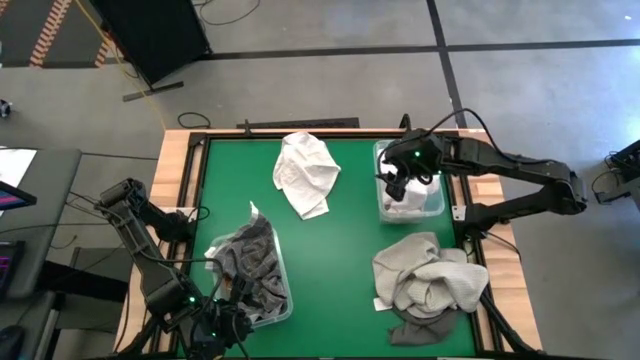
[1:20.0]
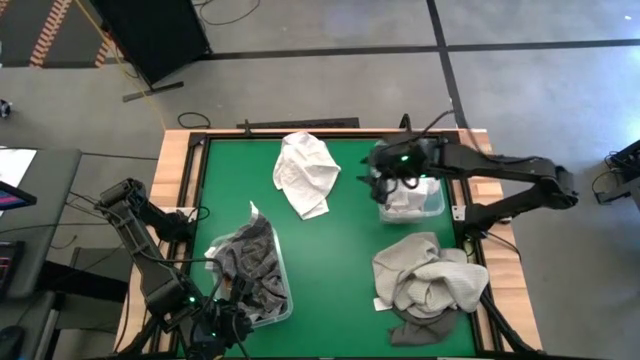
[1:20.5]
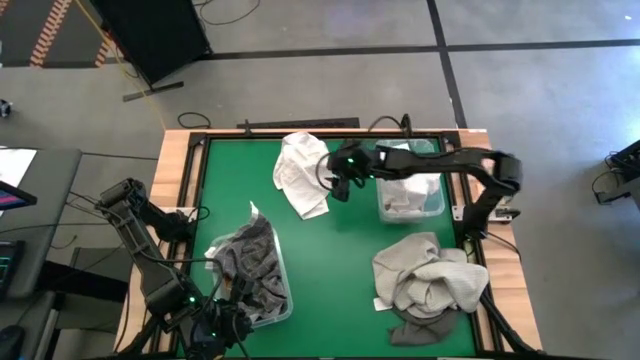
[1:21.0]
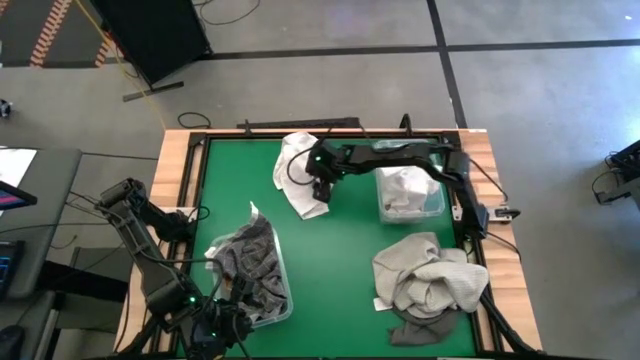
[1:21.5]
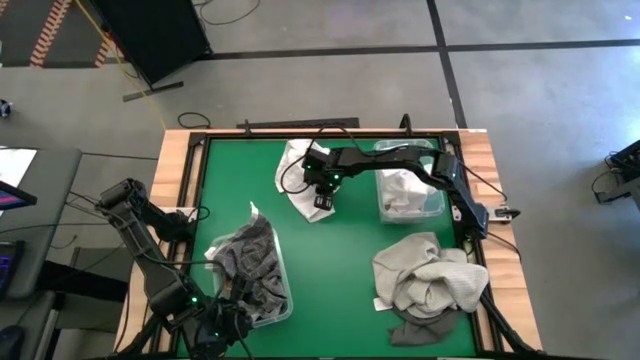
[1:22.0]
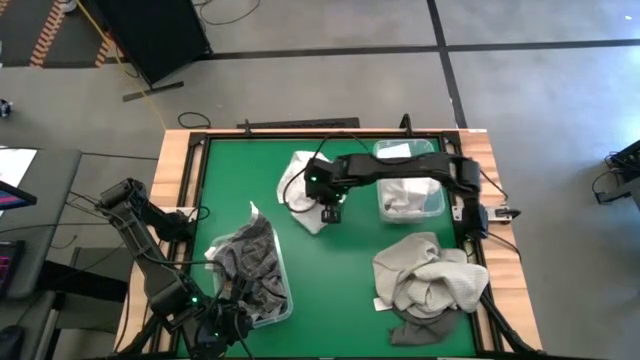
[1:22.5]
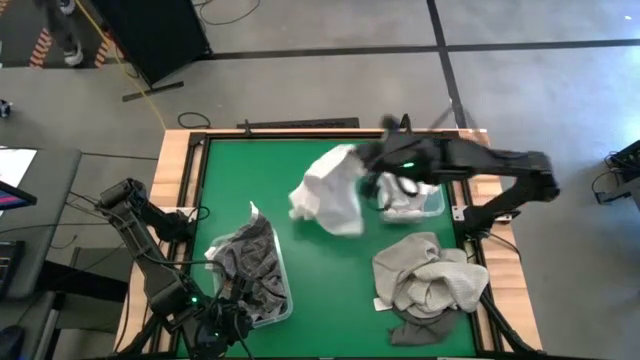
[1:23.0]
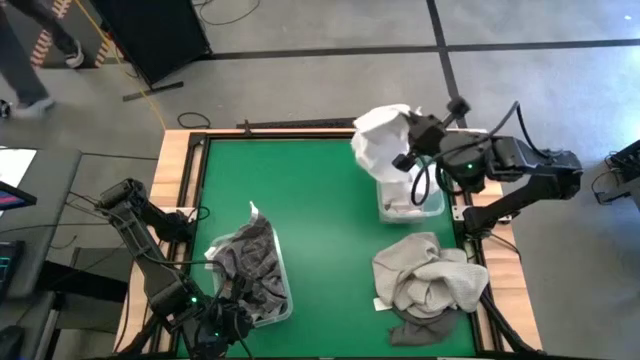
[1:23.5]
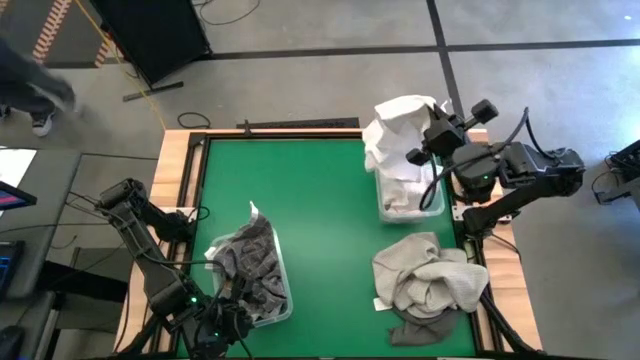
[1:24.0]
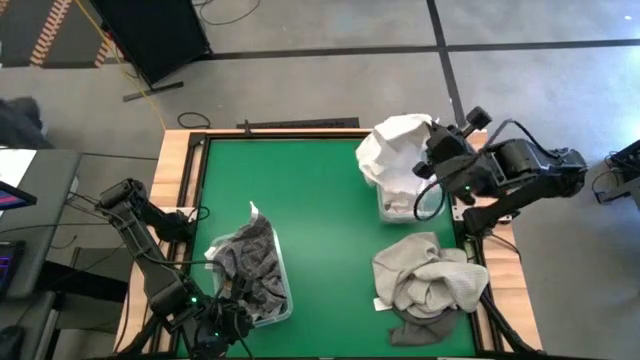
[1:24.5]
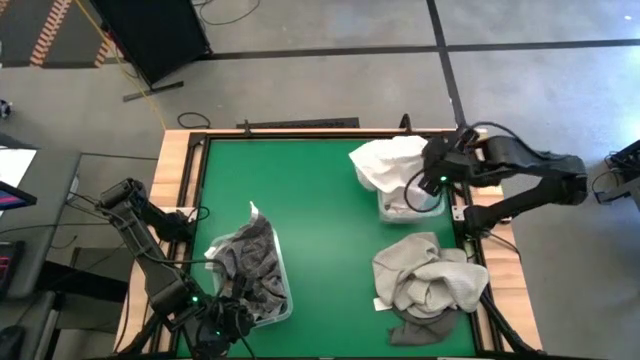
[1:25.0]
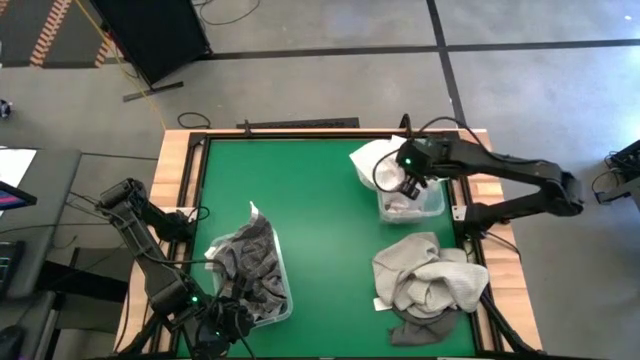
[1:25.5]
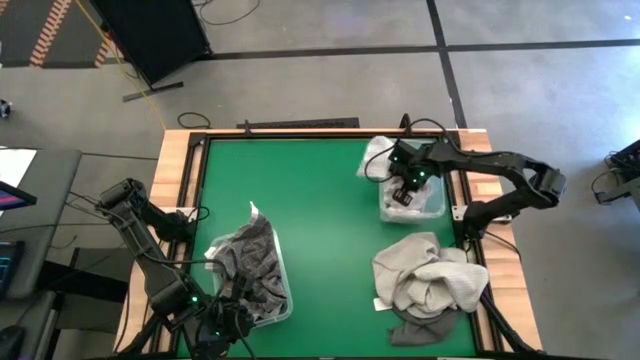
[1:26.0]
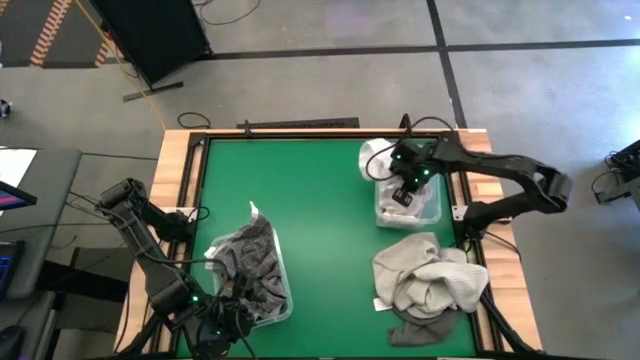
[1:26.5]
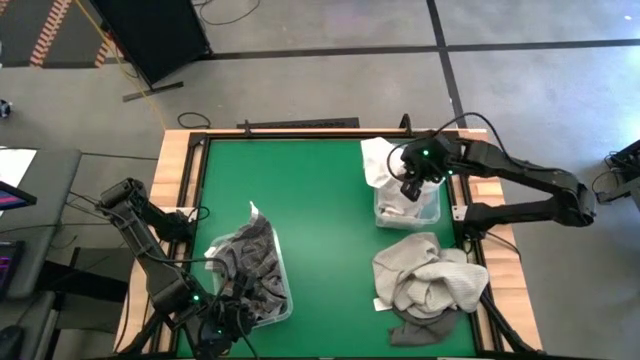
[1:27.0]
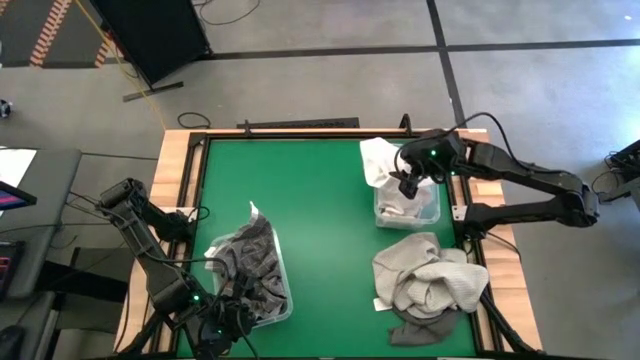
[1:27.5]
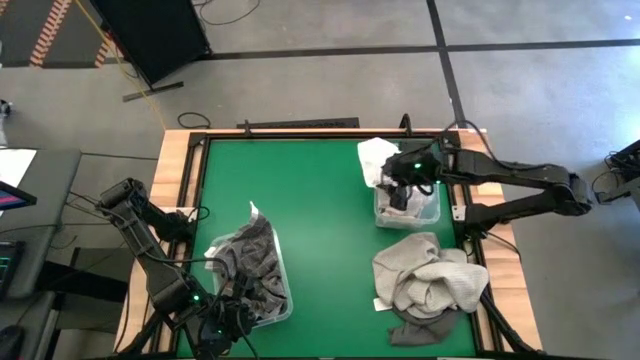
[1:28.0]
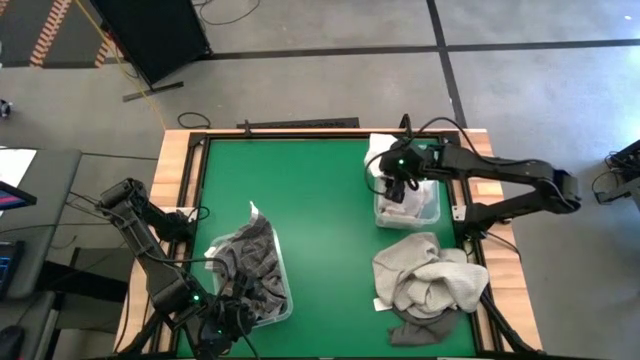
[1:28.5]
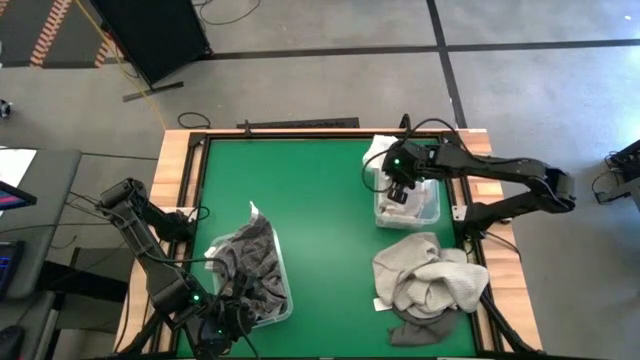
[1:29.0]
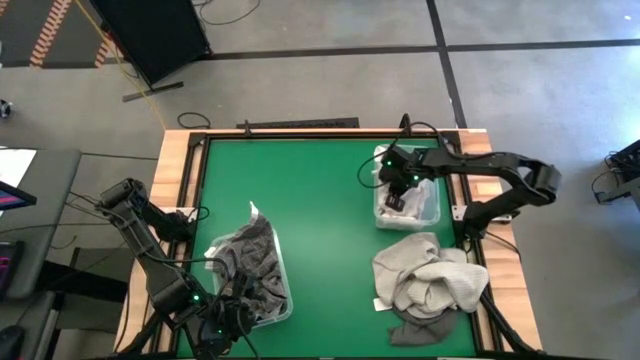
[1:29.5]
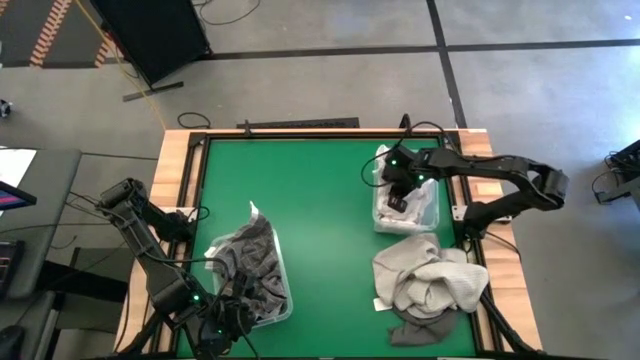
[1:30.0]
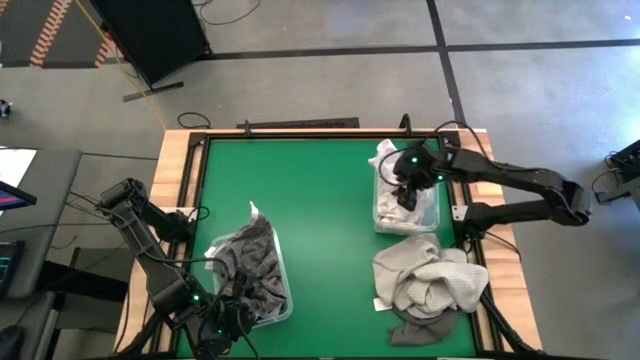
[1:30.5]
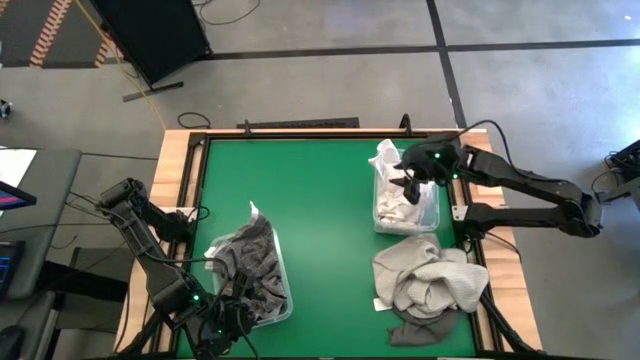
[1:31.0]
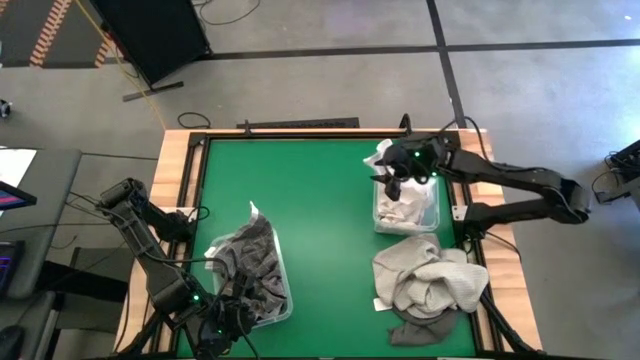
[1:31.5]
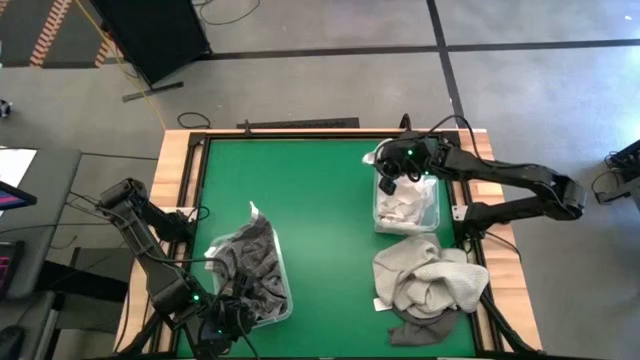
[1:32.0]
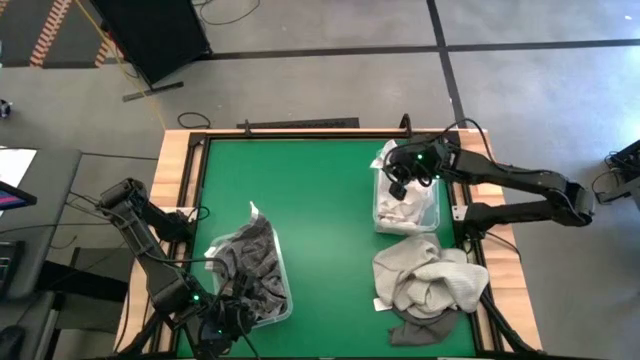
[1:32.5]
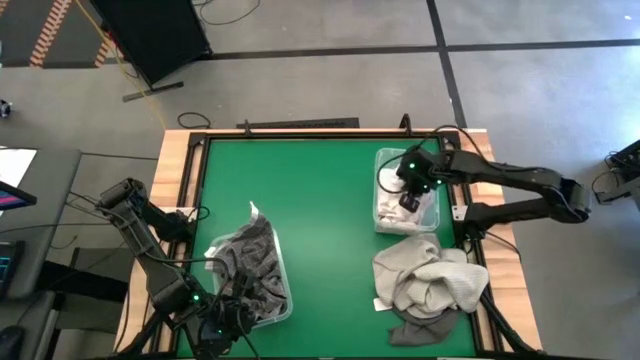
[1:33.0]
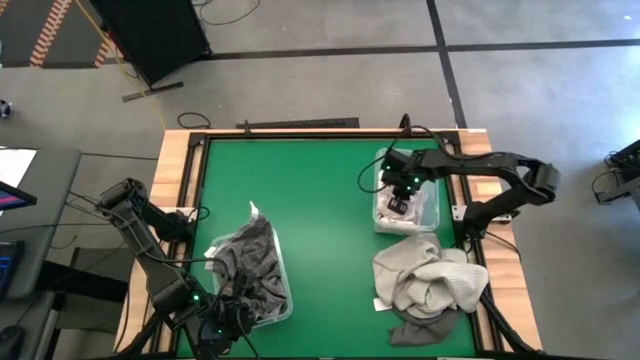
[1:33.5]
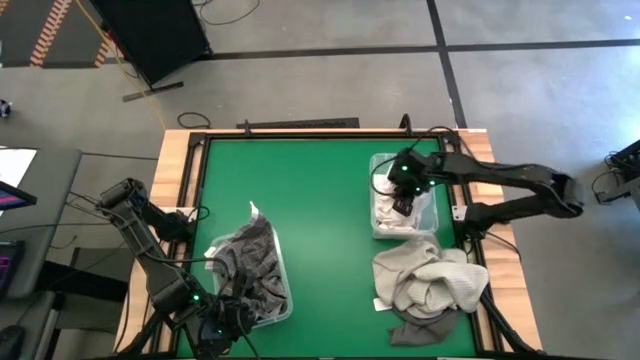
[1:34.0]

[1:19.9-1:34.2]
Task: Sort towels by color in basket
Put the white towel into the top transparent bin

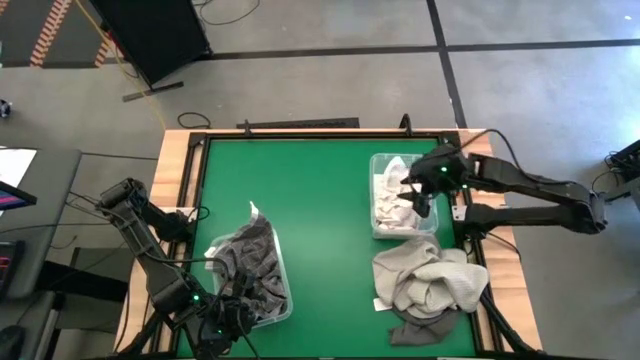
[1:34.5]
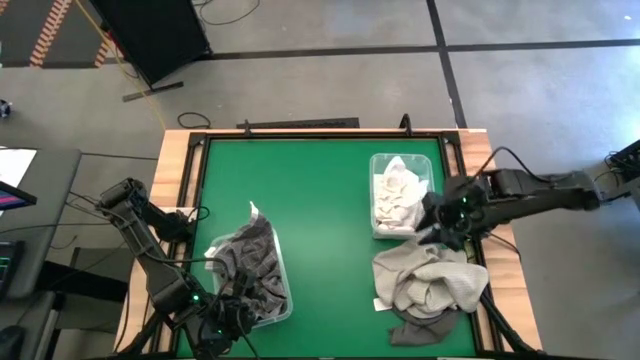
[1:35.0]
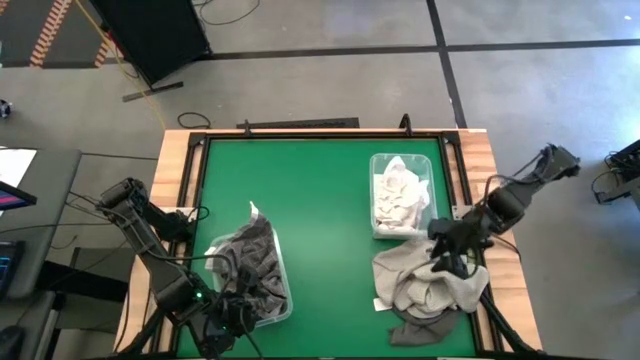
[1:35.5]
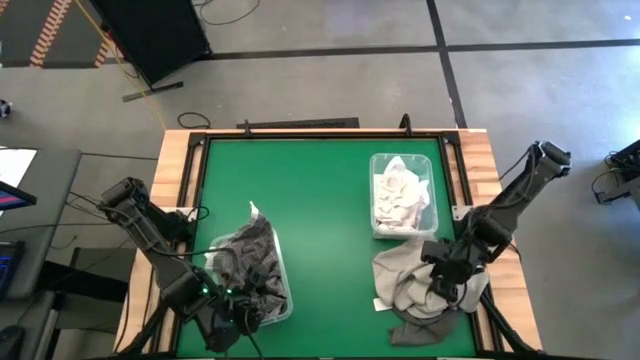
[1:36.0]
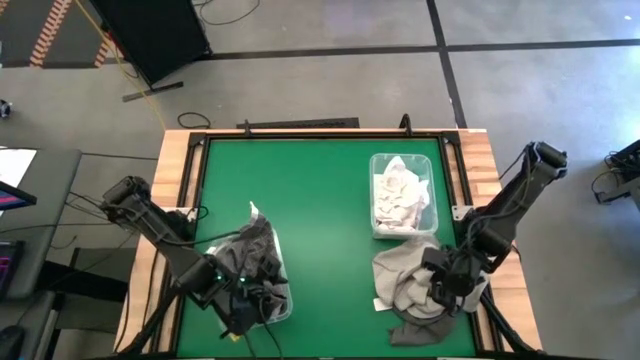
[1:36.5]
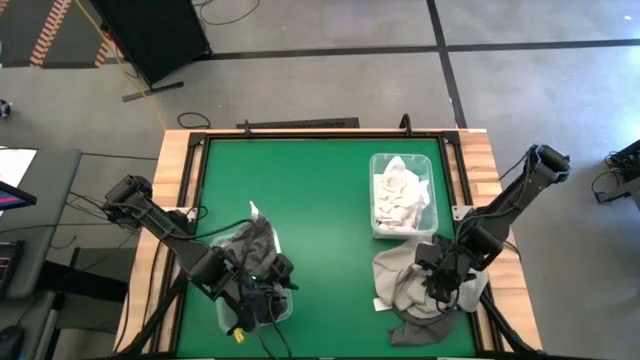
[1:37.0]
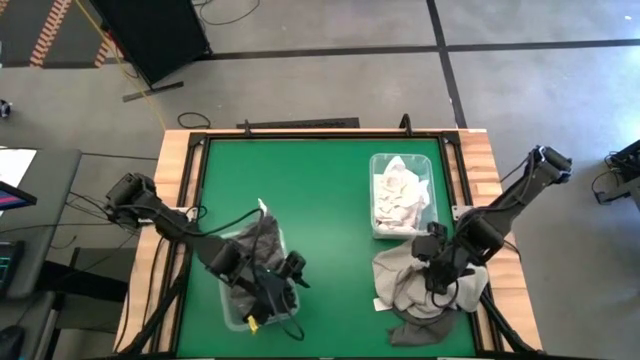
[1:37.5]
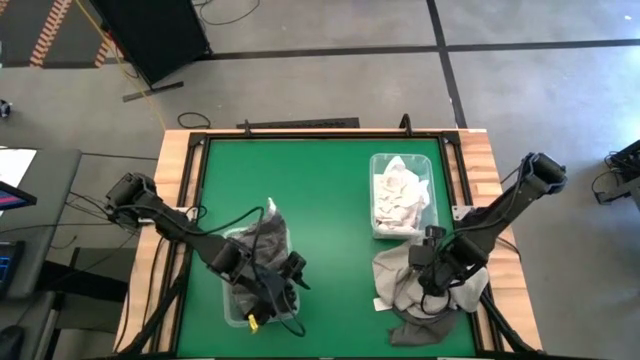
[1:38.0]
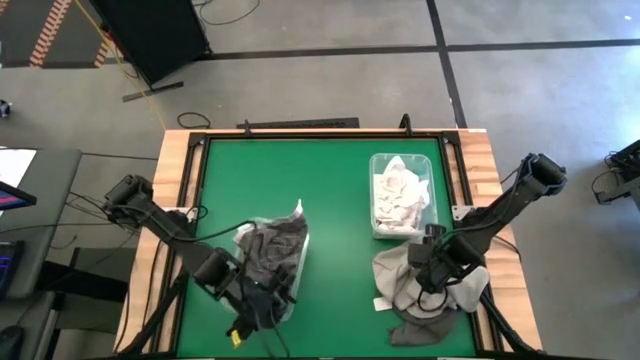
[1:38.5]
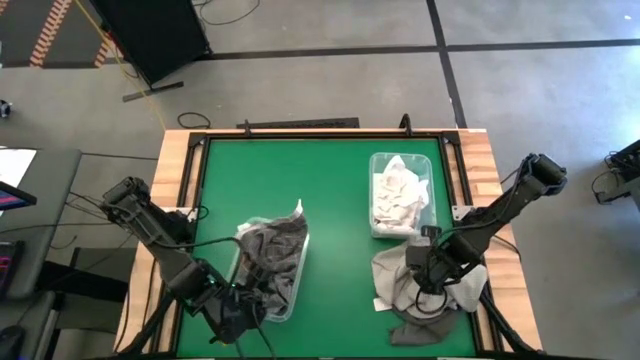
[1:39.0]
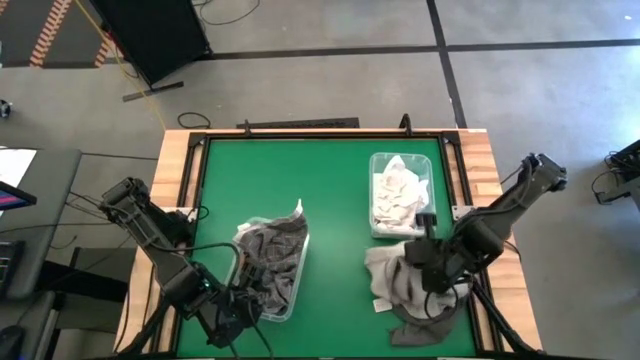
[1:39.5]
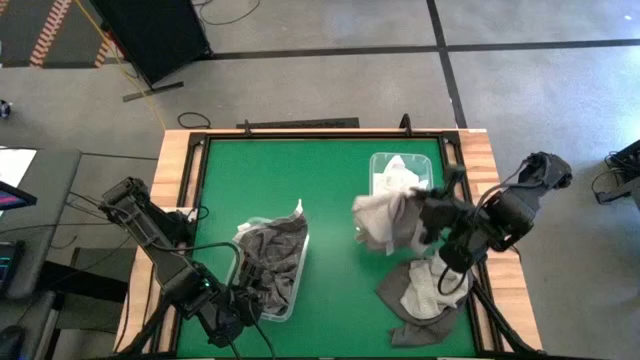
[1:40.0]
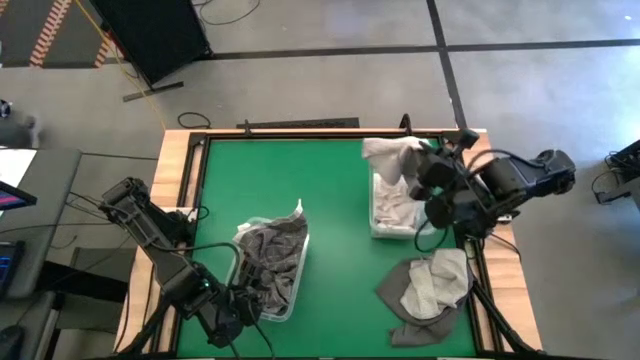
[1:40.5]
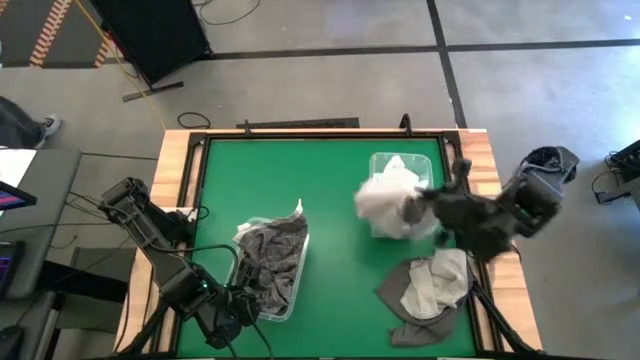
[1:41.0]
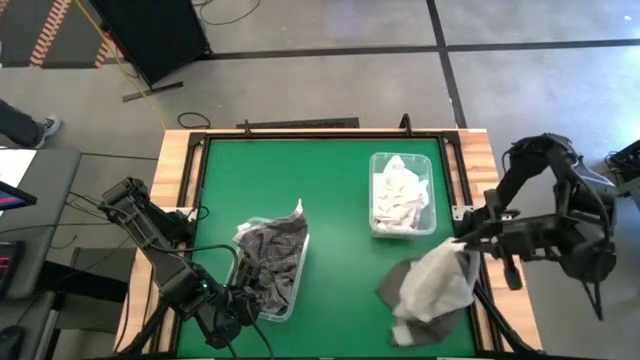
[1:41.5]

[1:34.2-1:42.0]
Put the gray towel into the top transparent bin
